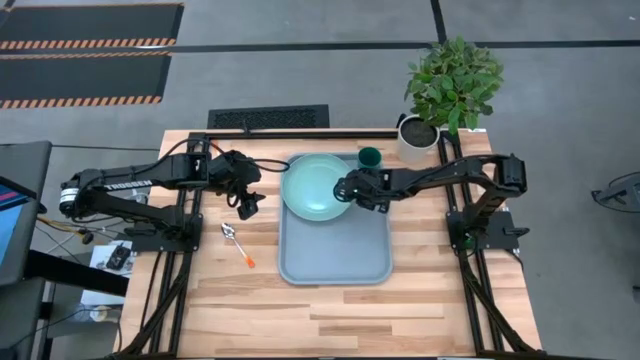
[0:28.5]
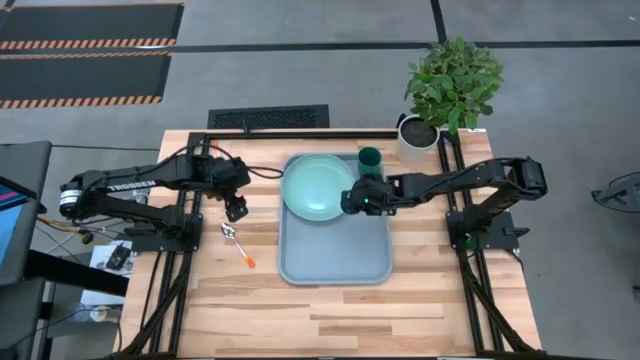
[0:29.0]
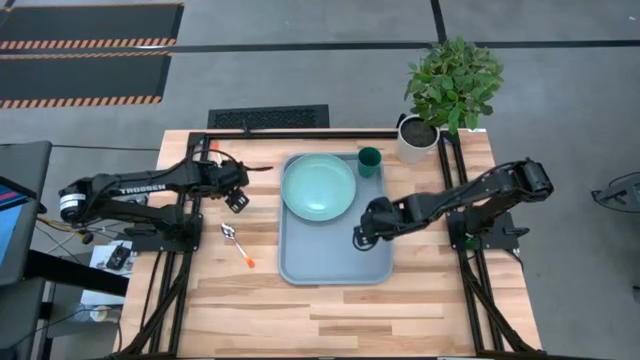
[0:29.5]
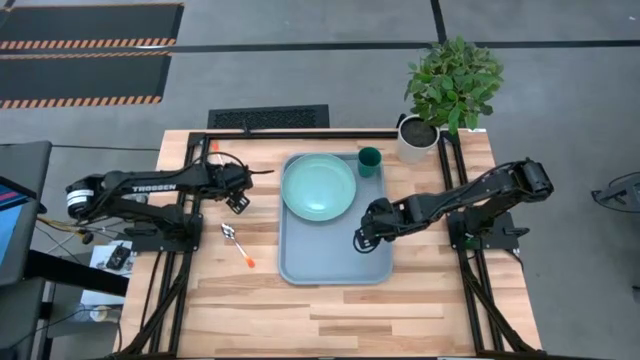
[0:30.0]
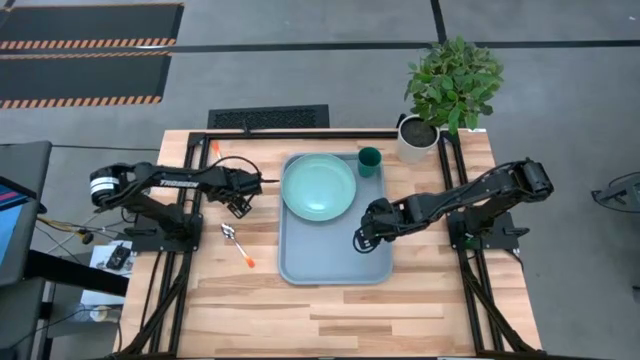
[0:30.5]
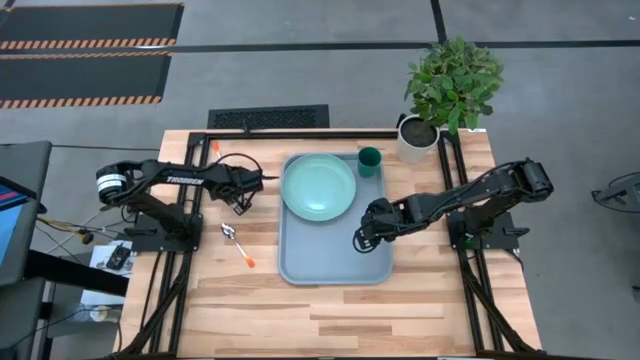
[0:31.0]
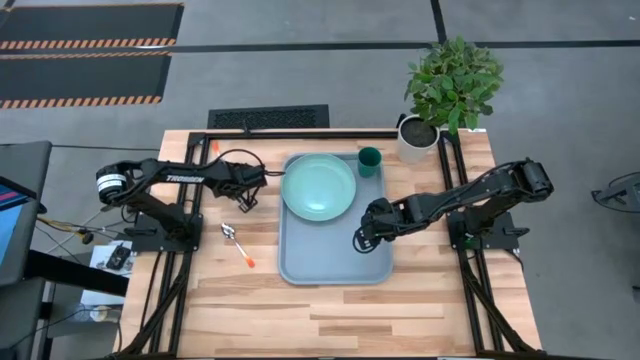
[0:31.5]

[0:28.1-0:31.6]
Task: Pick and place plate/cup/fork/spoon on tray
Put the orange fork on the gray serving tray to the bottom of the light green plate

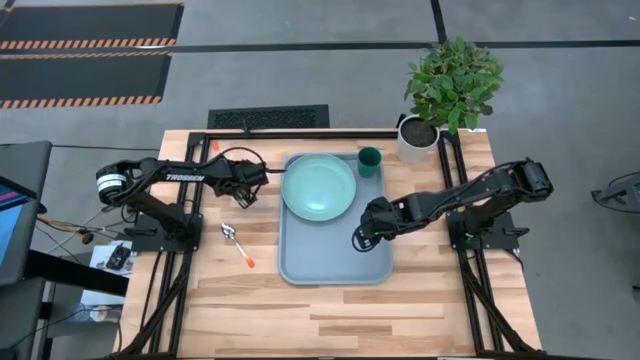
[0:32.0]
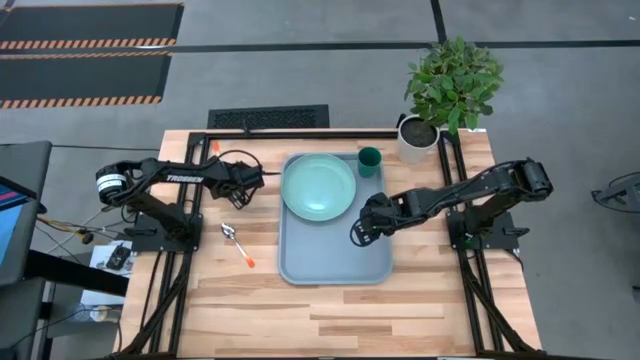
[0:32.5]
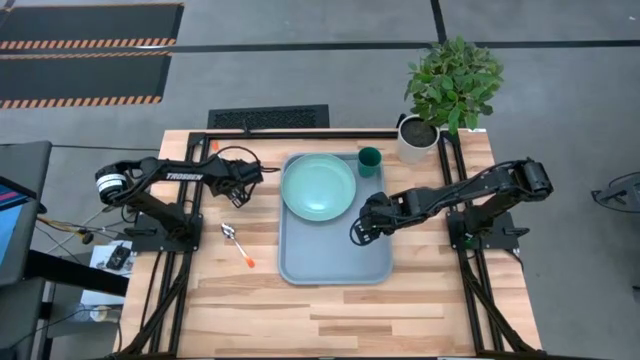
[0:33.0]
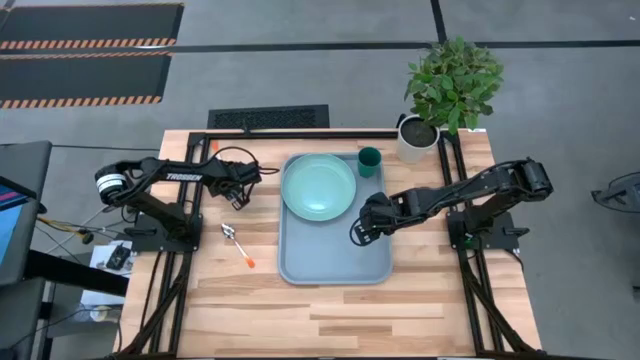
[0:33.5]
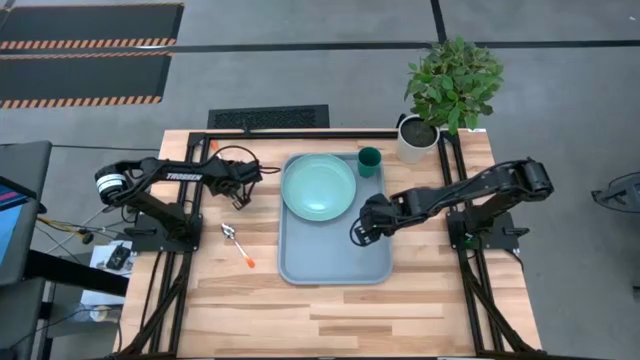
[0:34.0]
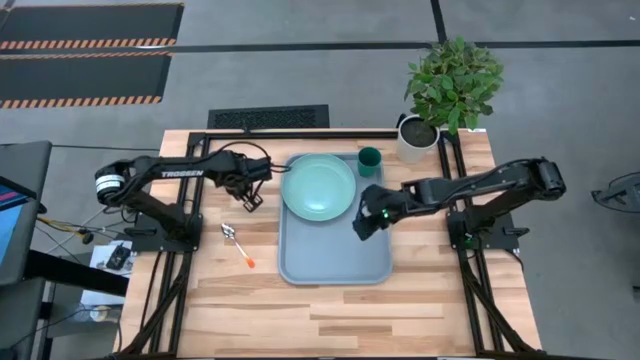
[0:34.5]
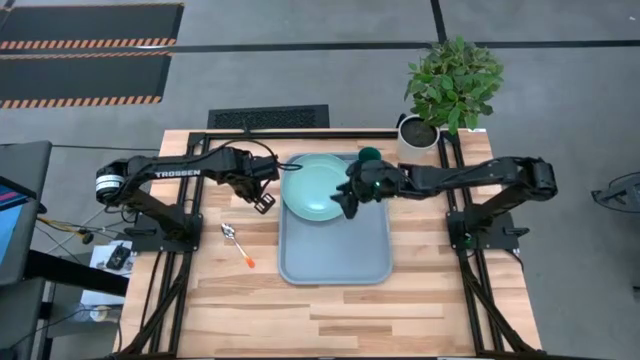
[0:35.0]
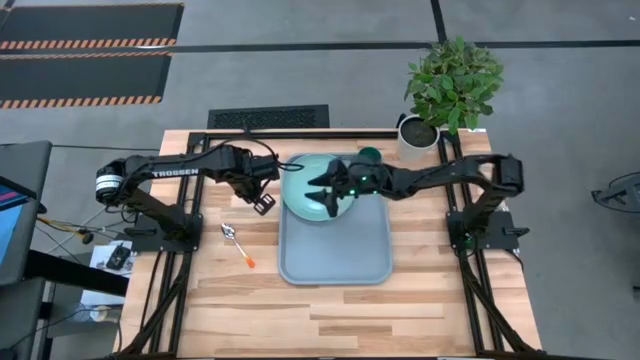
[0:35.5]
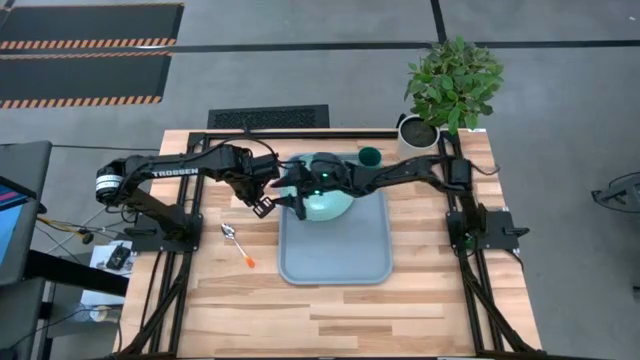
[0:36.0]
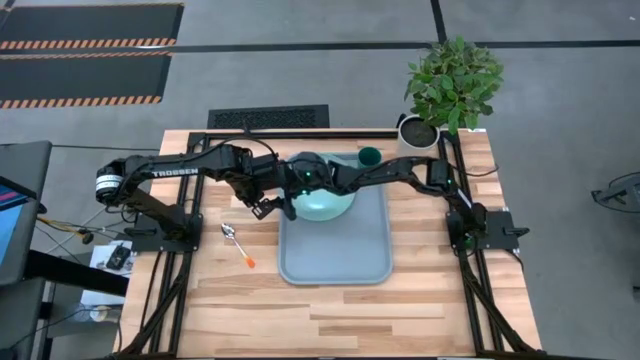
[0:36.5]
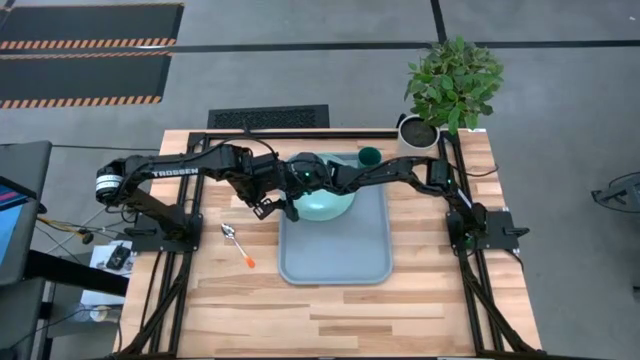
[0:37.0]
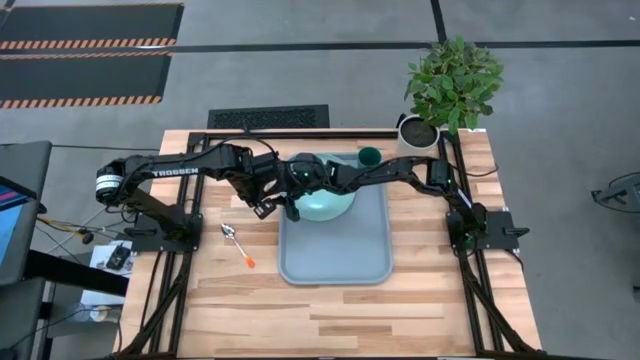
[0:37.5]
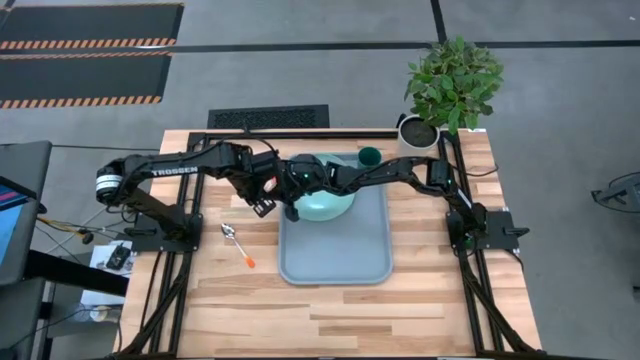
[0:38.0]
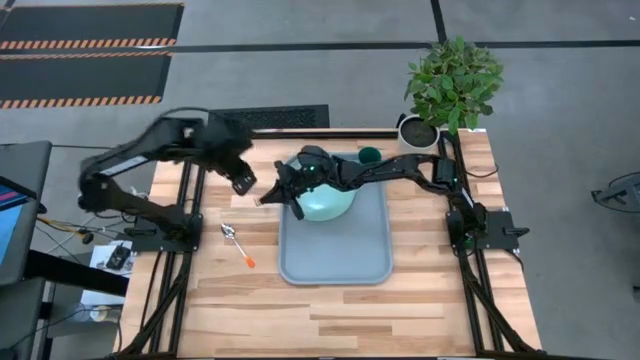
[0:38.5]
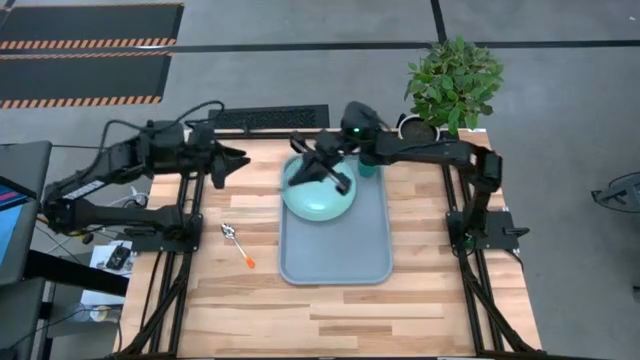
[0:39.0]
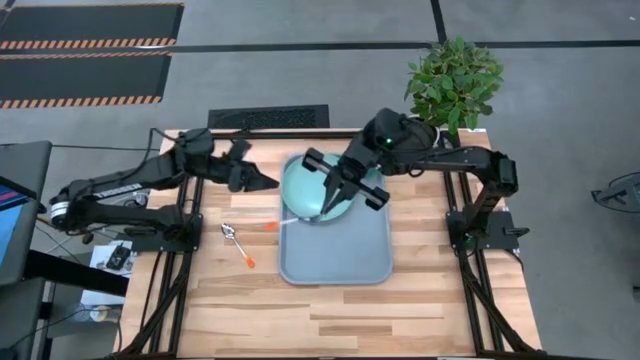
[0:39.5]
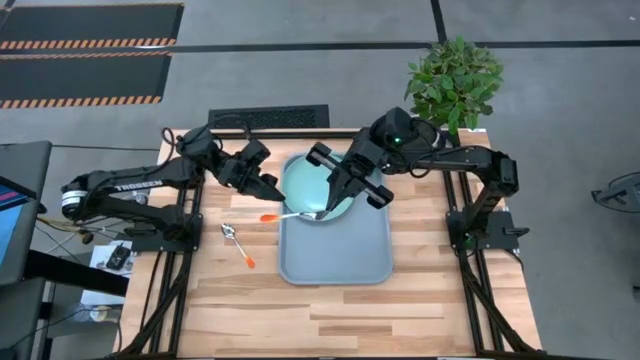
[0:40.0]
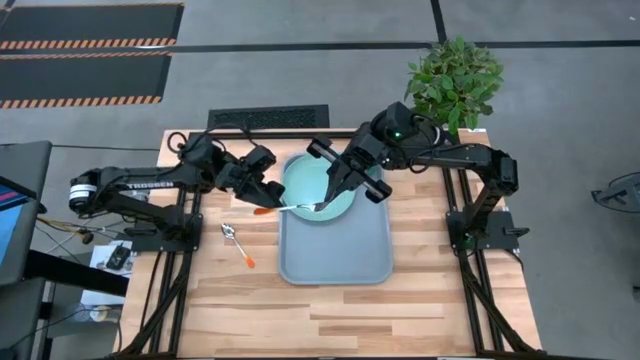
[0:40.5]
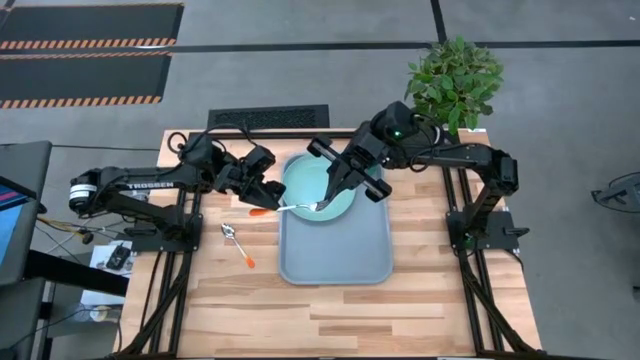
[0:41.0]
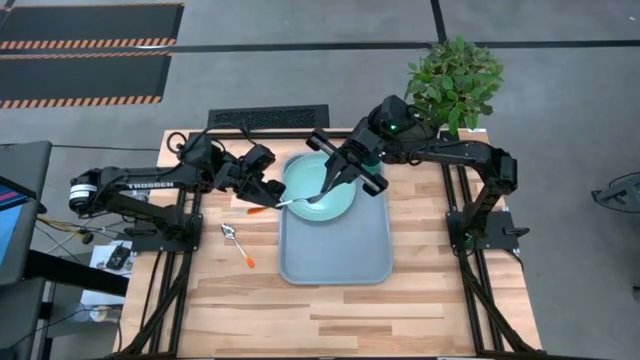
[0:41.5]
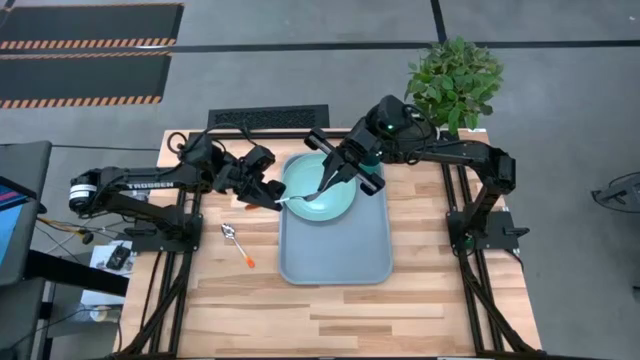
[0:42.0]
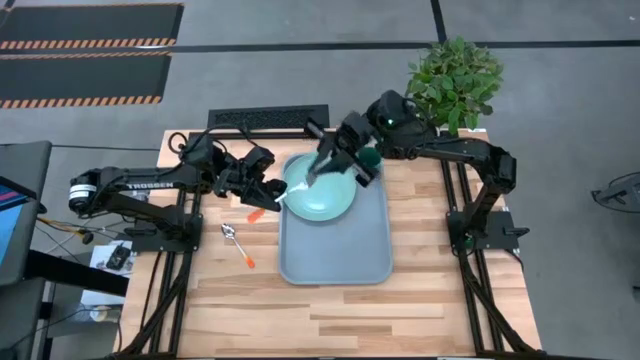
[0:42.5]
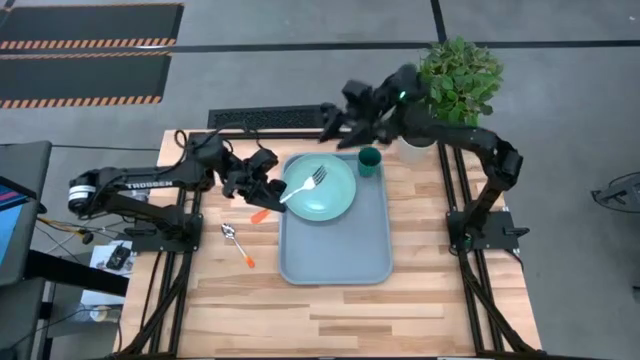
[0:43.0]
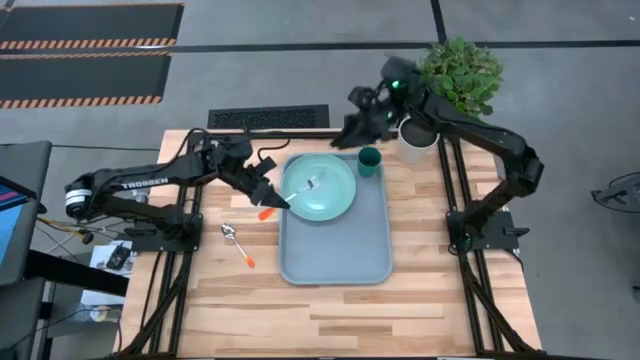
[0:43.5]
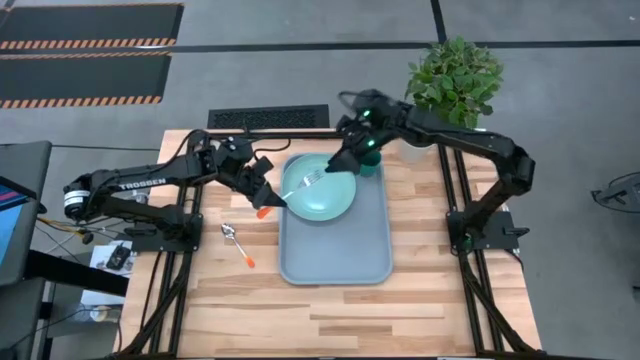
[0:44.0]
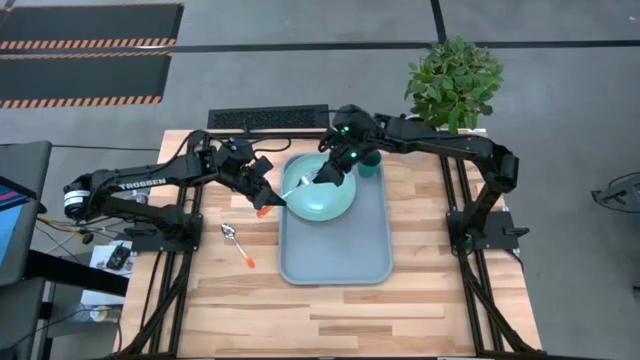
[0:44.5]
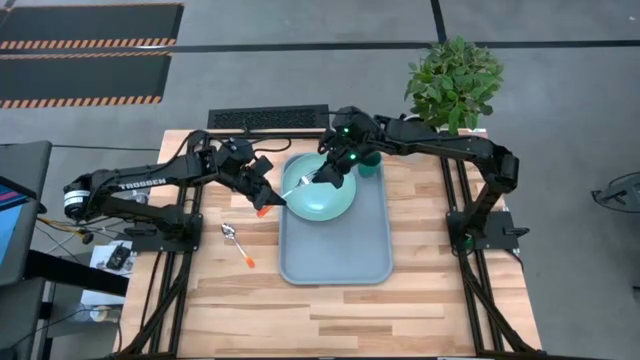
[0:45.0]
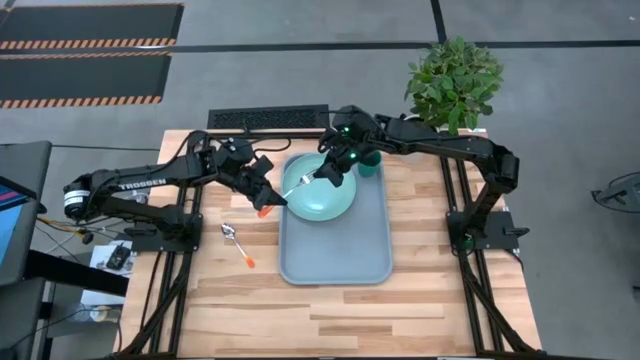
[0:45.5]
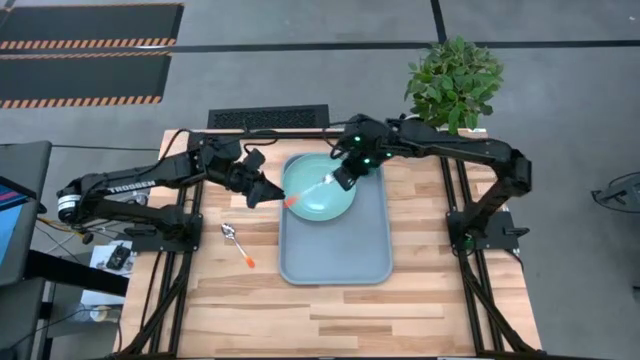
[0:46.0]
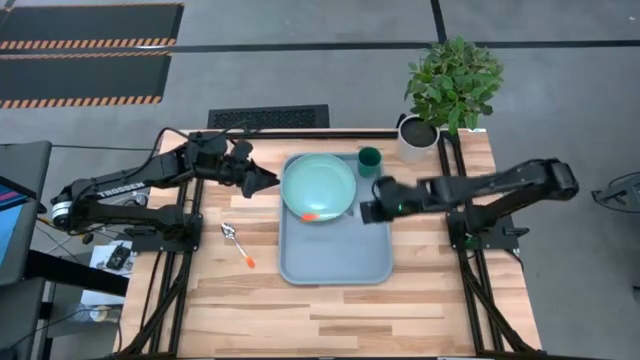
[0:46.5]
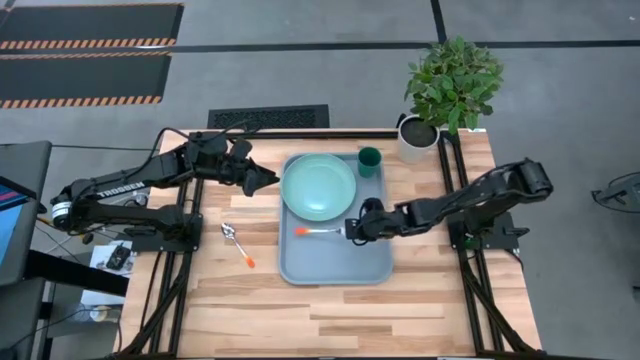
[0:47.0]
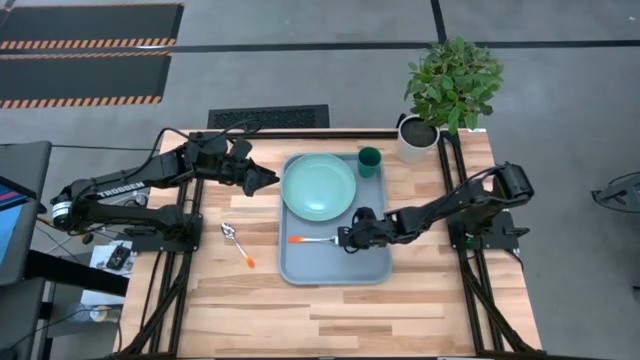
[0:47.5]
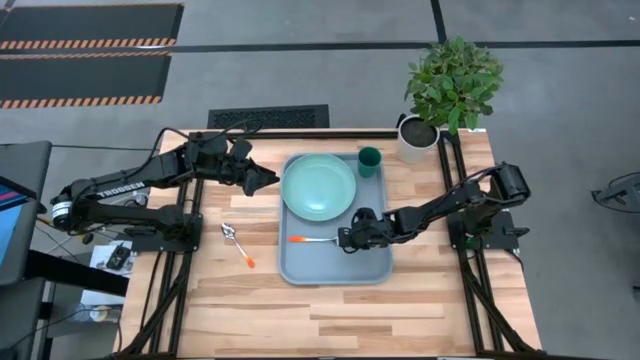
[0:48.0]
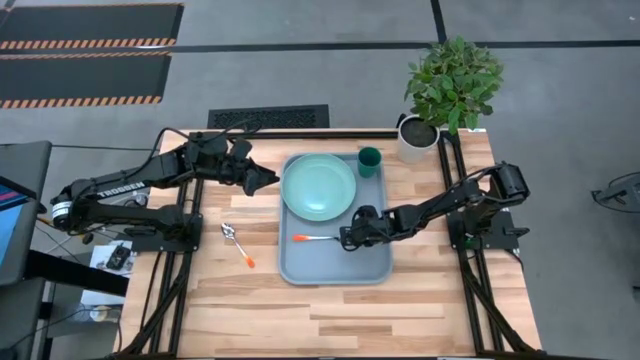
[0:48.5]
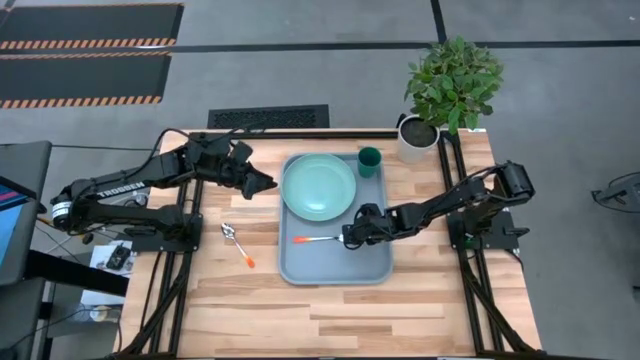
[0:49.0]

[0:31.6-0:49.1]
Put the orange fork on the gray serving tray to the bottom of the light green plate

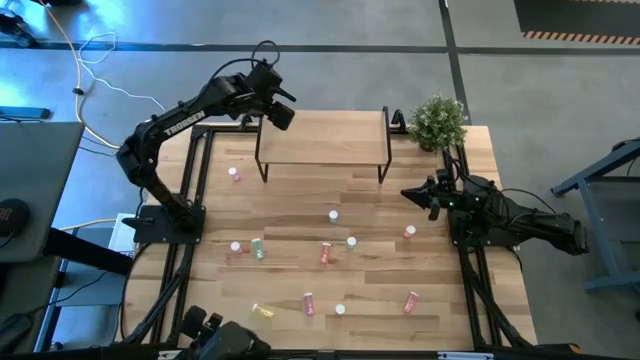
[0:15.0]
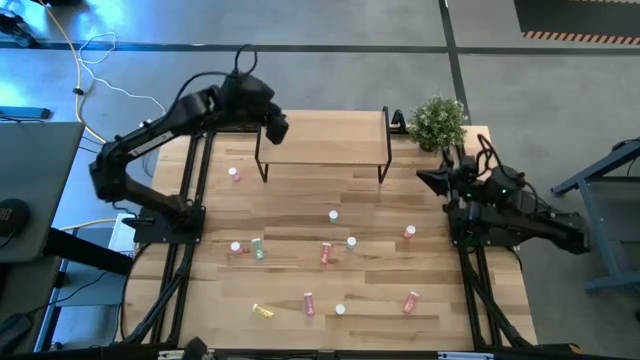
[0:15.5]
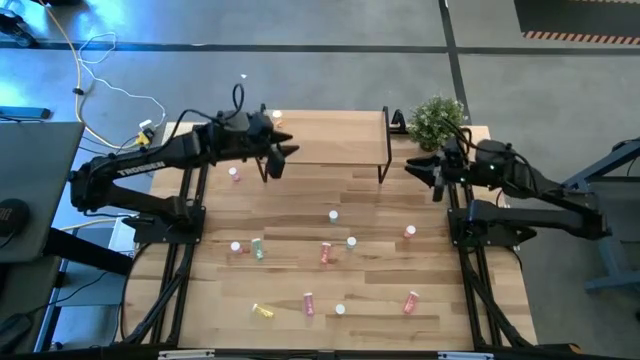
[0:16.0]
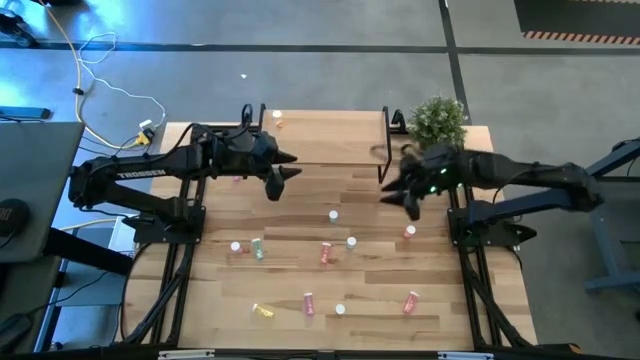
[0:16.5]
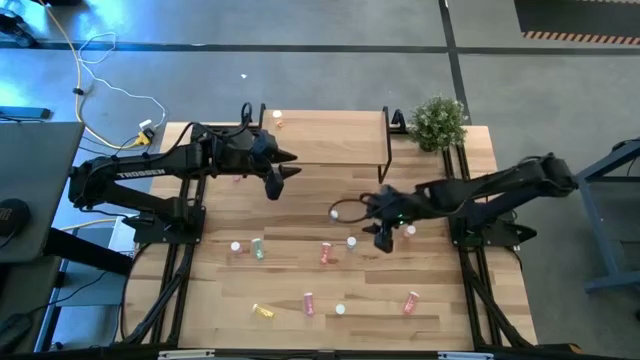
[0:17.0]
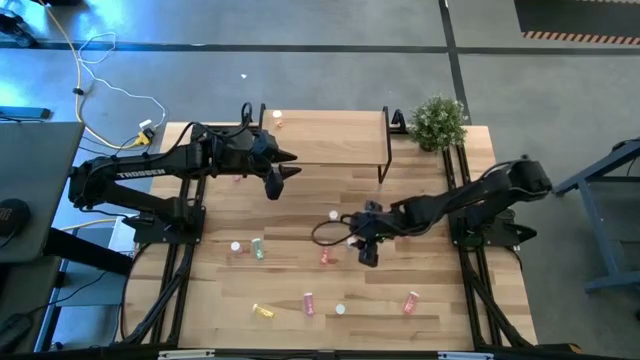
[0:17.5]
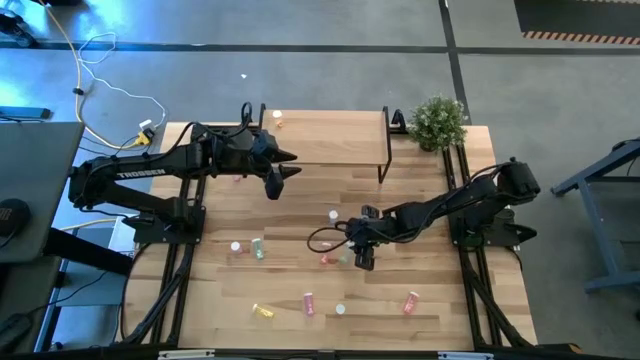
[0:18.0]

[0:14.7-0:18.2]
Task: Pick and place medicine bottles onto shelf by color
Put the bottom right blue pill bottle on the shelf
